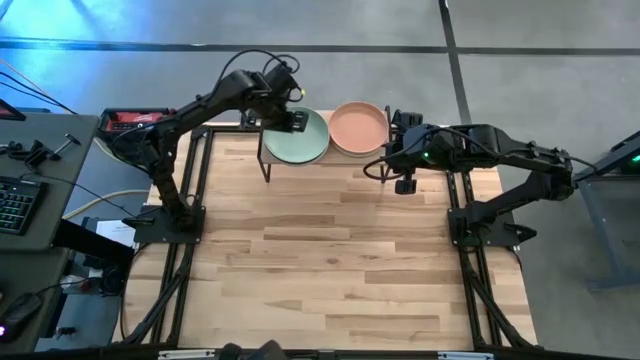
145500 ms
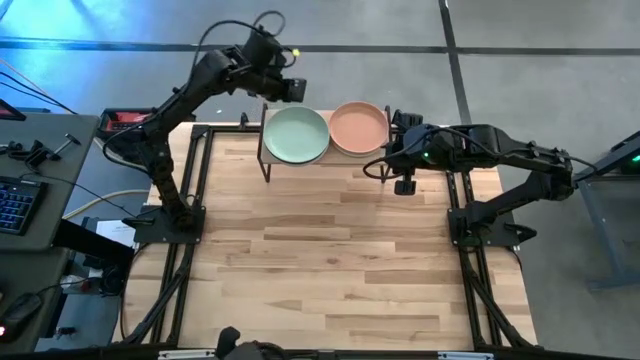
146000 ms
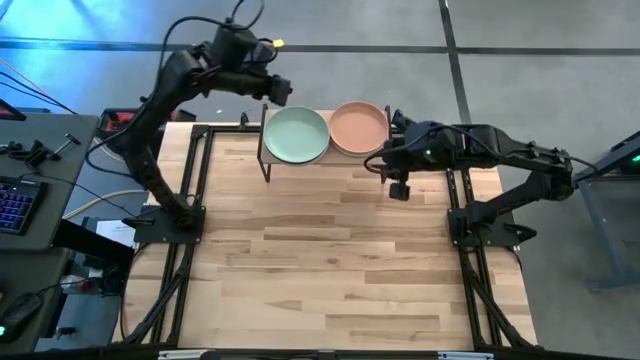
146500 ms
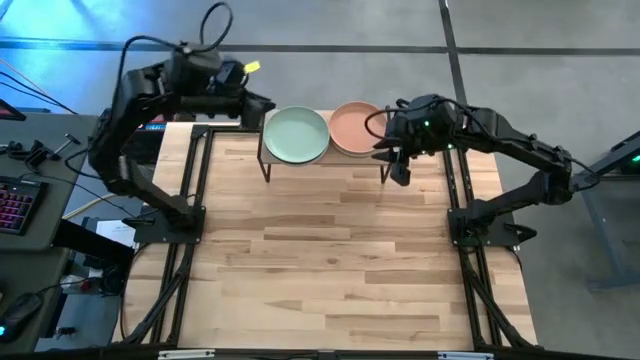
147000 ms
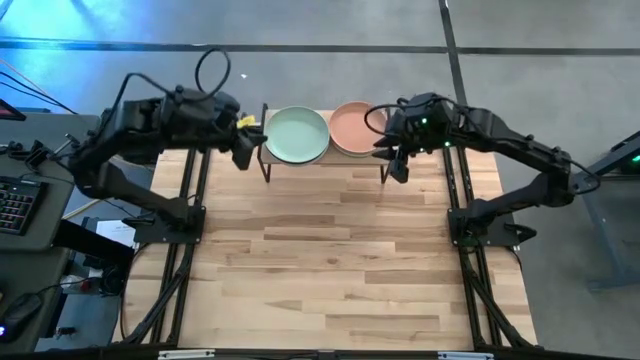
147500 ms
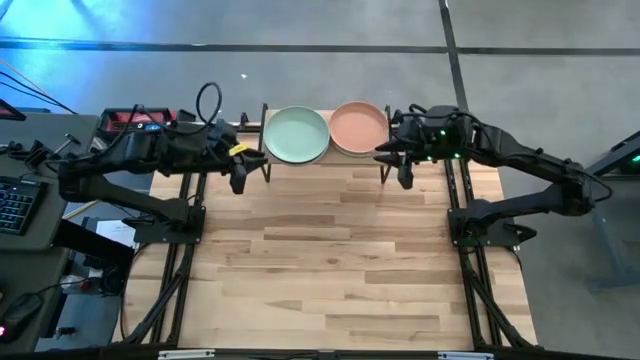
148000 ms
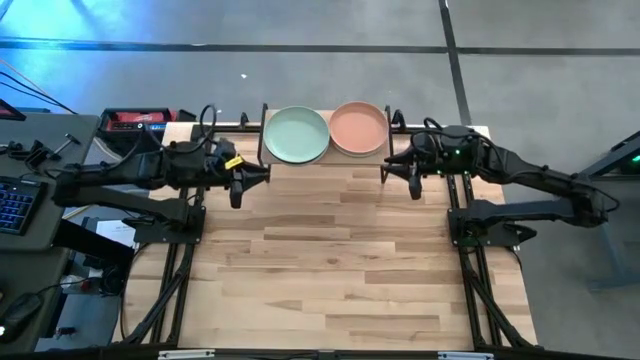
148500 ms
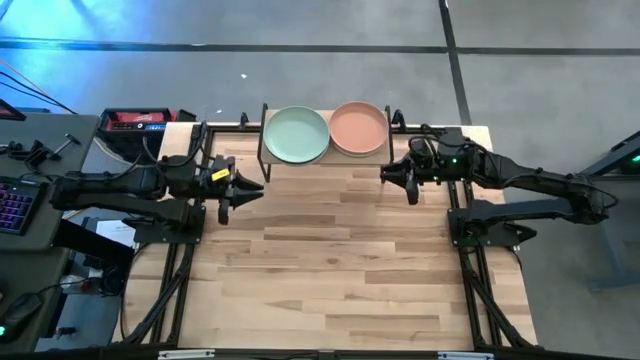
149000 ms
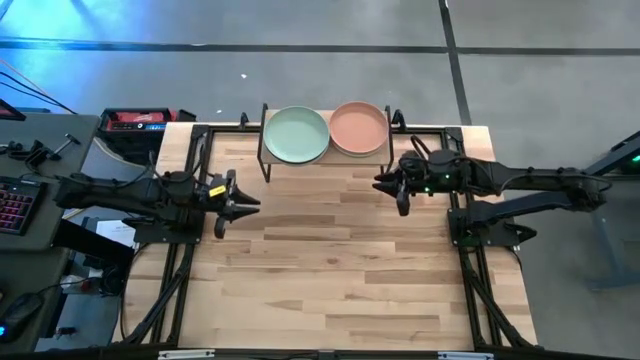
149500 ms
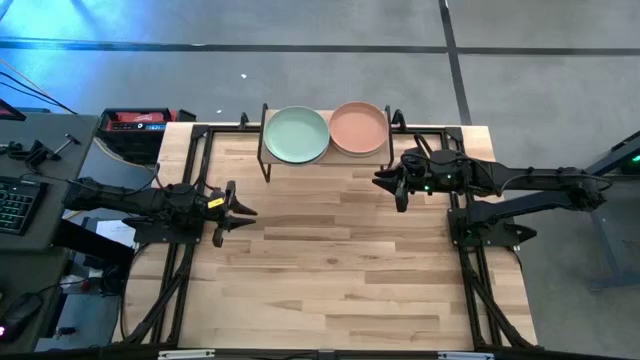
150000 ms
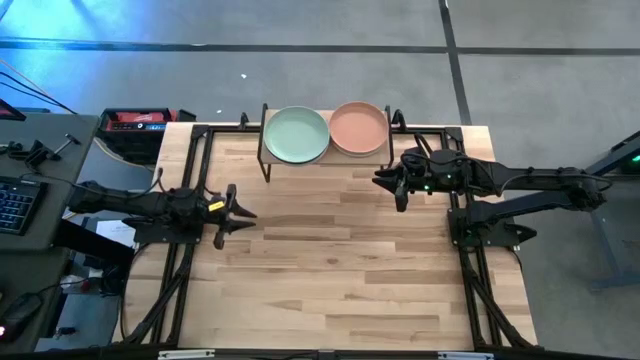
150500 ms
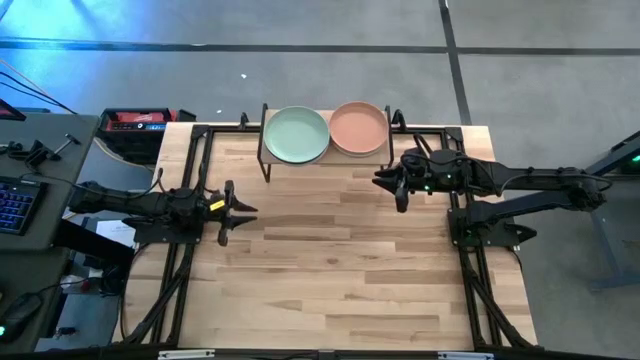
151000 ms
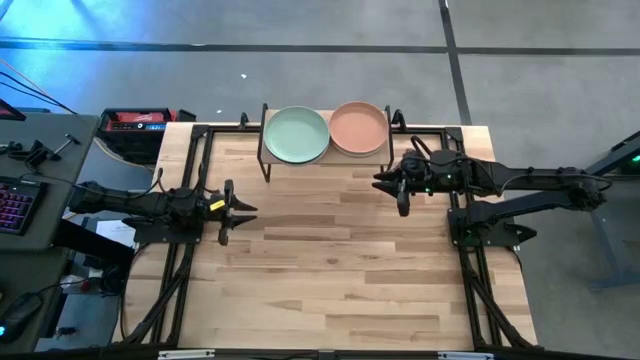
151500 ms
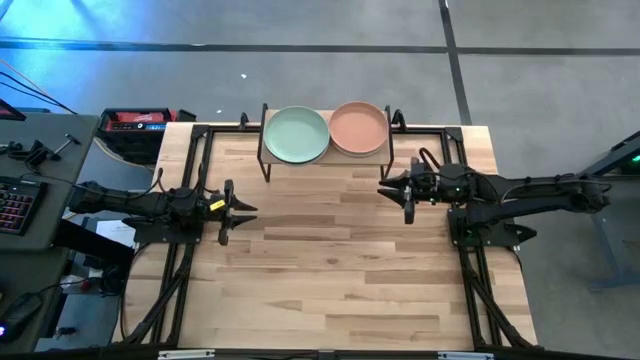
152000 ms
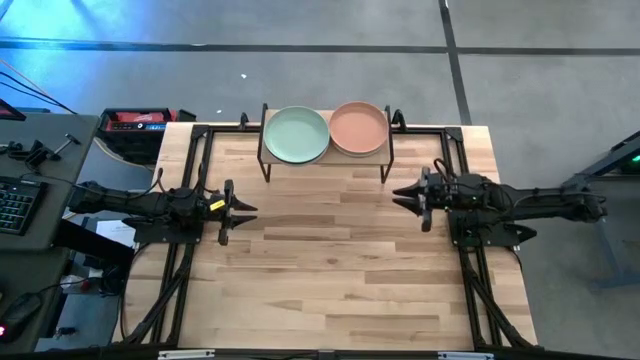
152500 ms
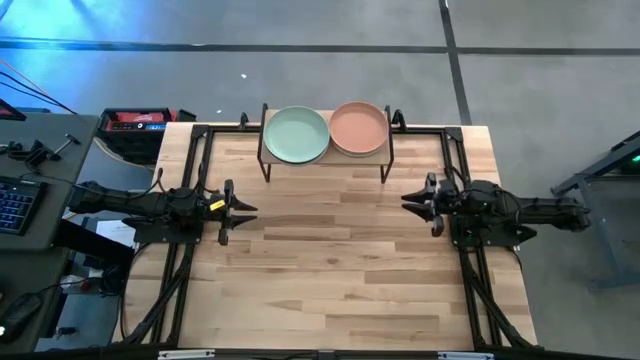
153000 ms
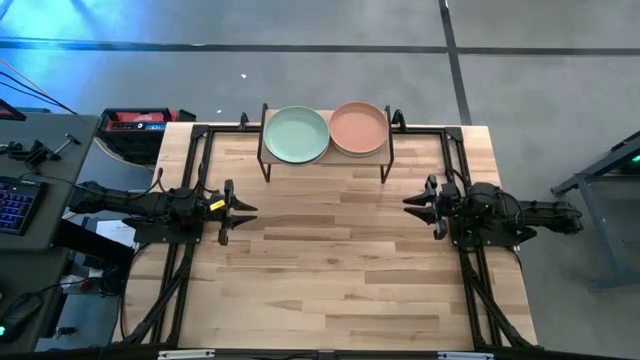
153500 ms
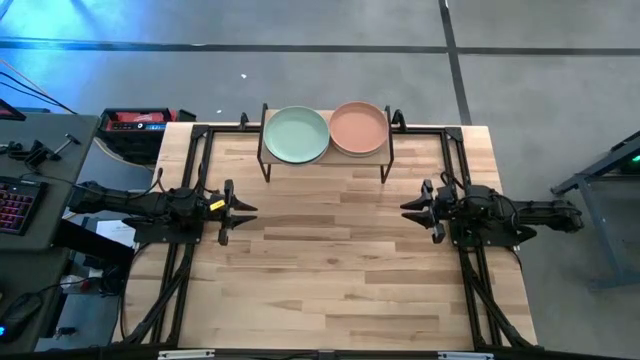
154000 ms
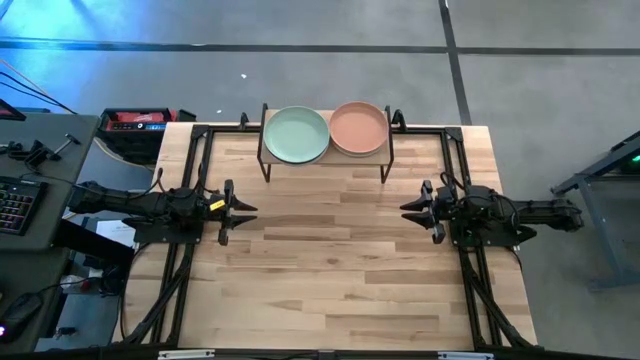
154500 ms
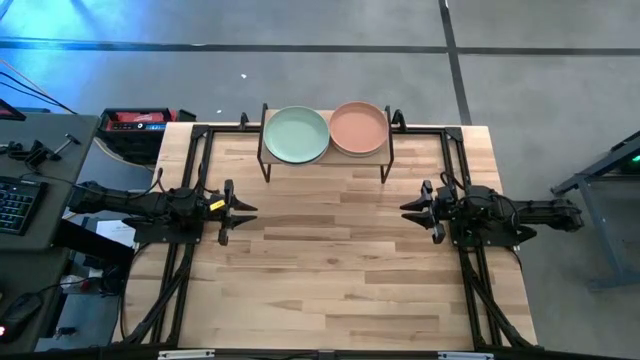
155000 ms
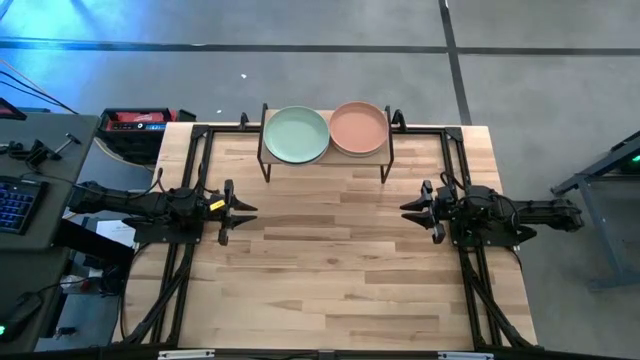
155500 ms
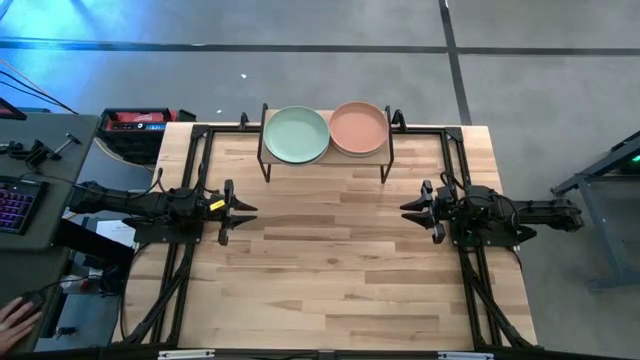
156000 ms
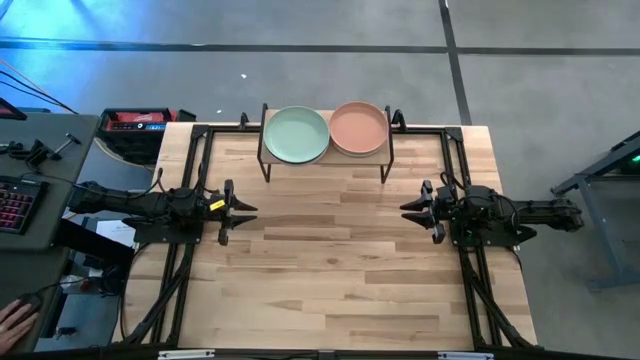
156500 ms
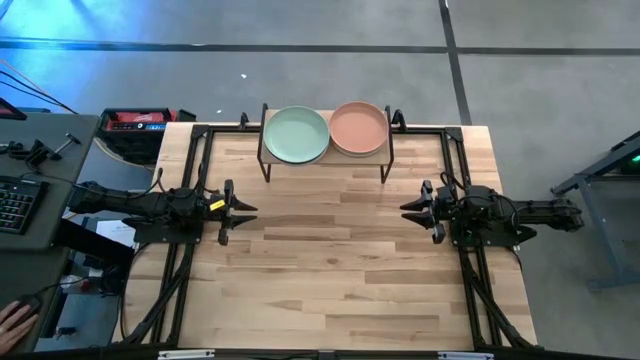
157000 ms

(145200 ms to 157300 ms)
Task: Place and stack plates onto a shelf
Return to Home Position

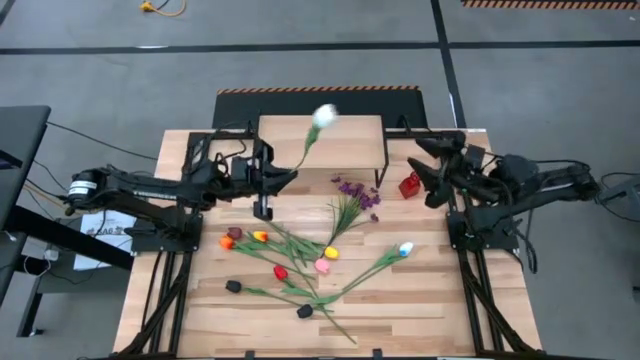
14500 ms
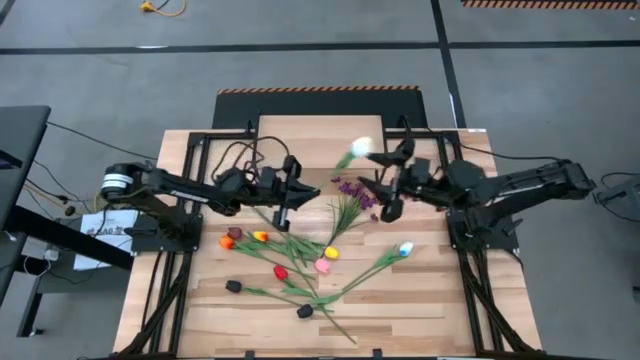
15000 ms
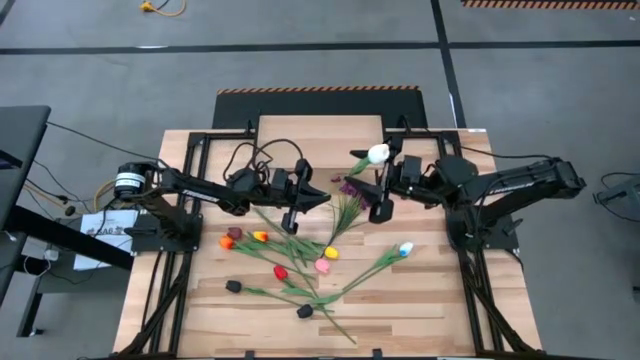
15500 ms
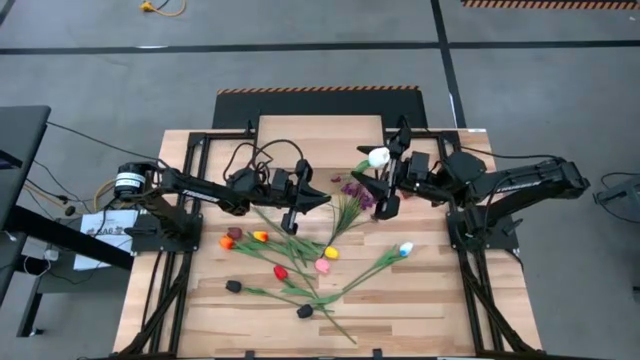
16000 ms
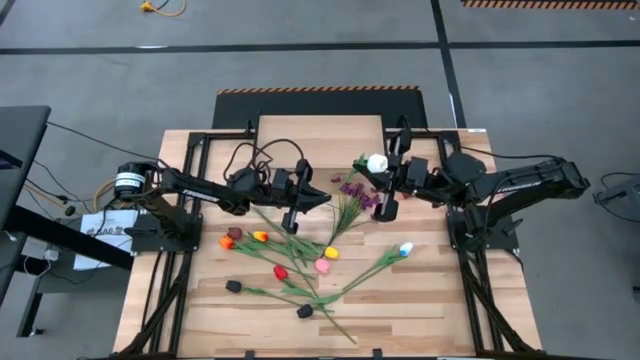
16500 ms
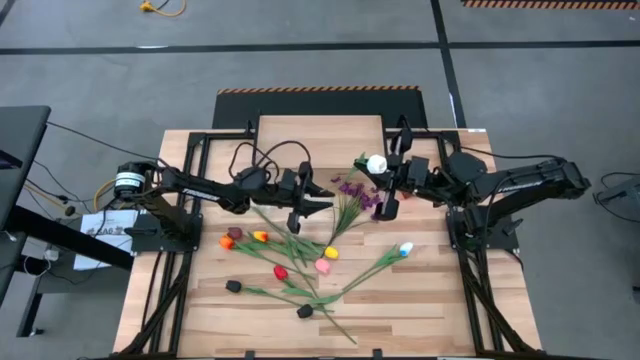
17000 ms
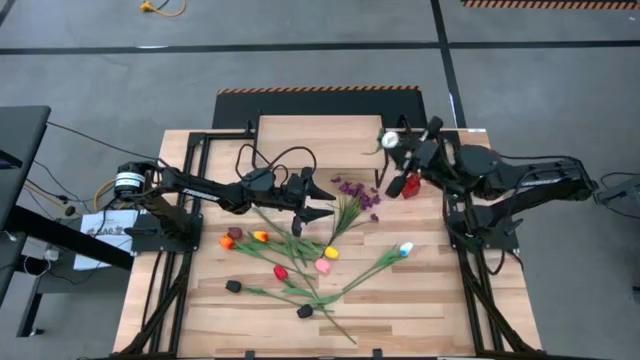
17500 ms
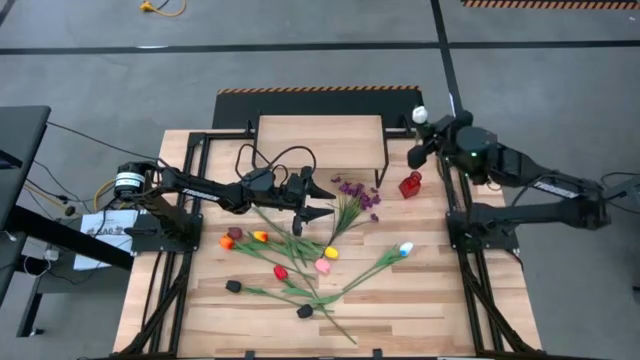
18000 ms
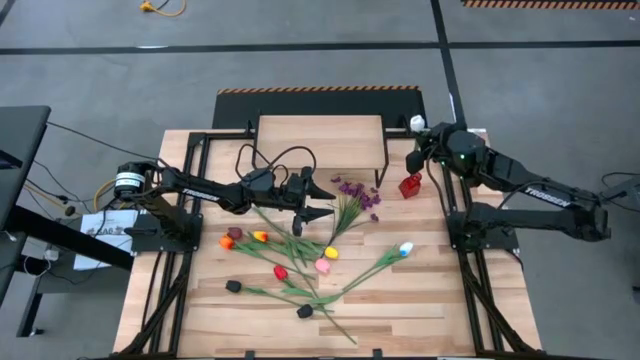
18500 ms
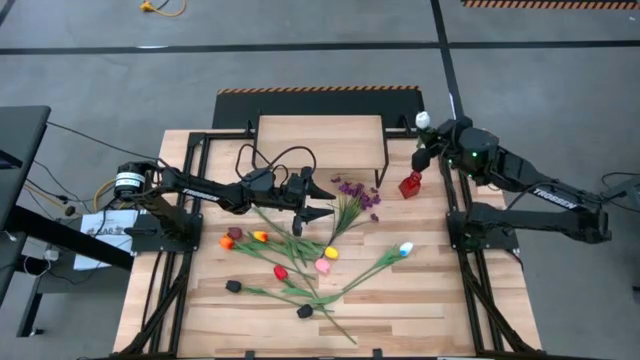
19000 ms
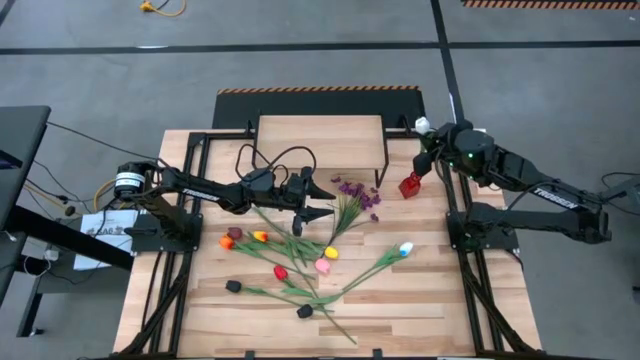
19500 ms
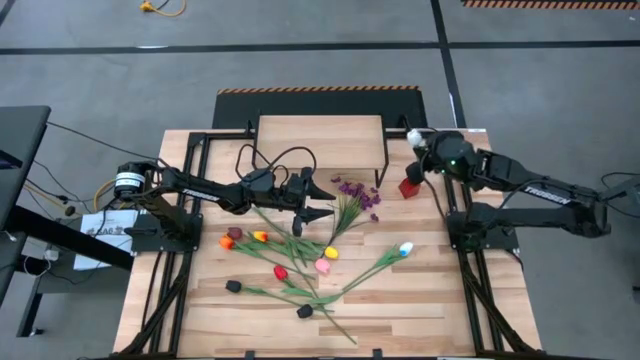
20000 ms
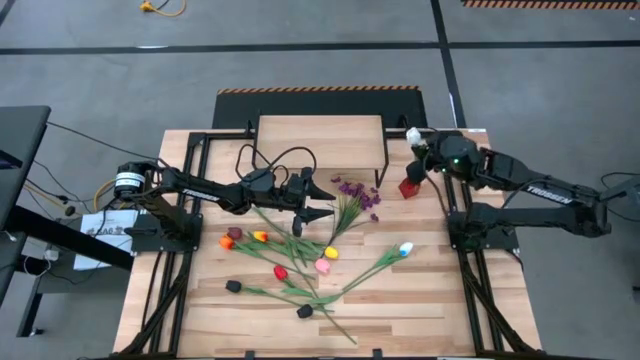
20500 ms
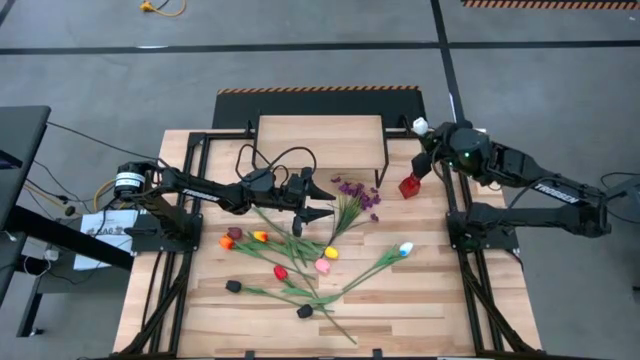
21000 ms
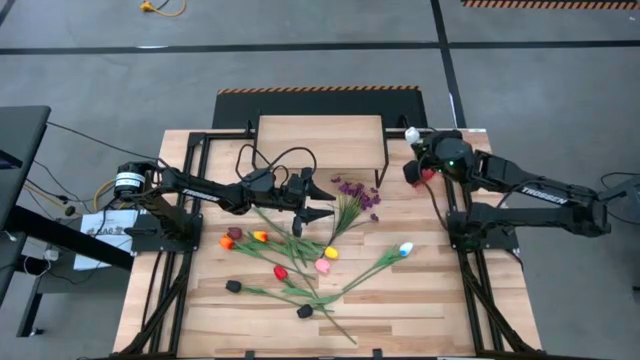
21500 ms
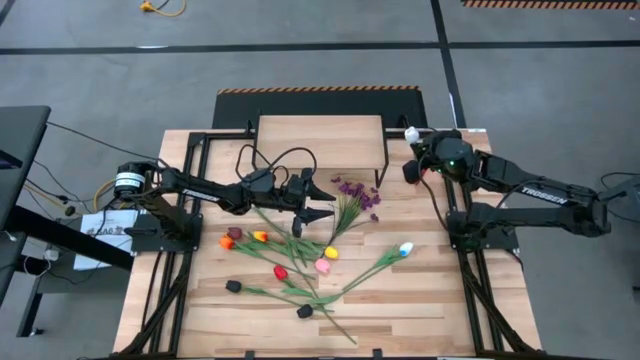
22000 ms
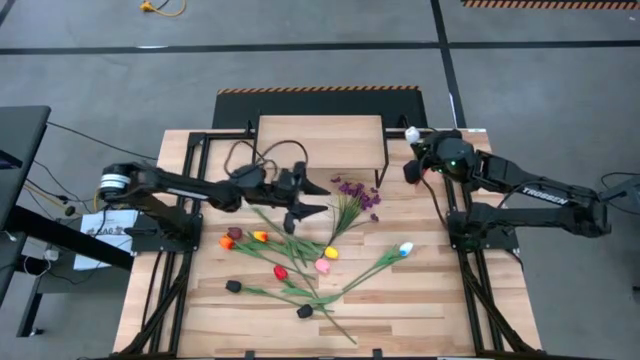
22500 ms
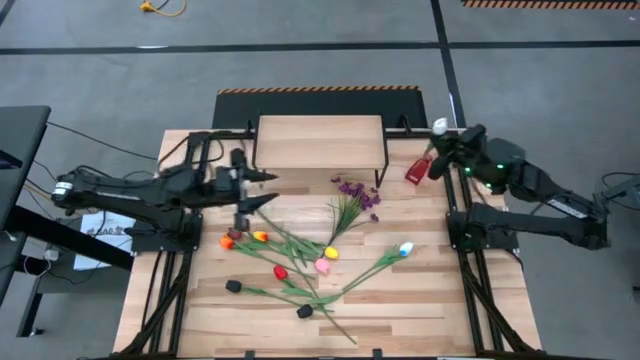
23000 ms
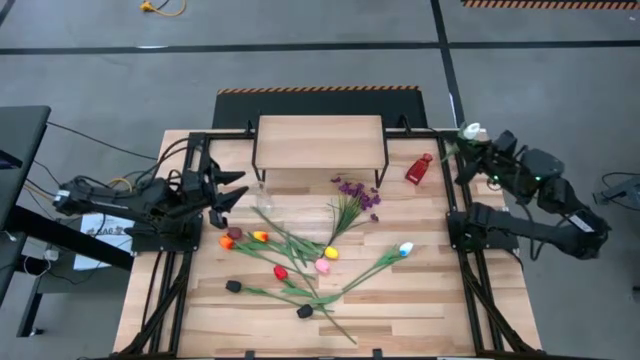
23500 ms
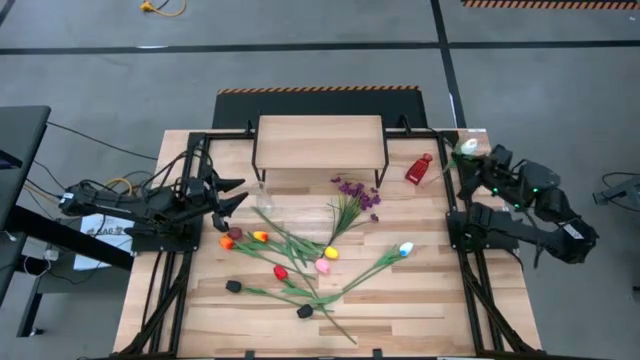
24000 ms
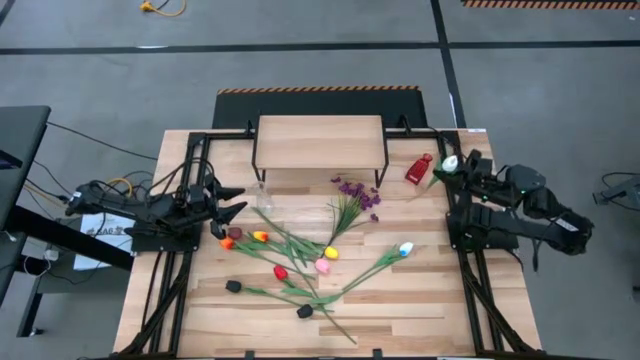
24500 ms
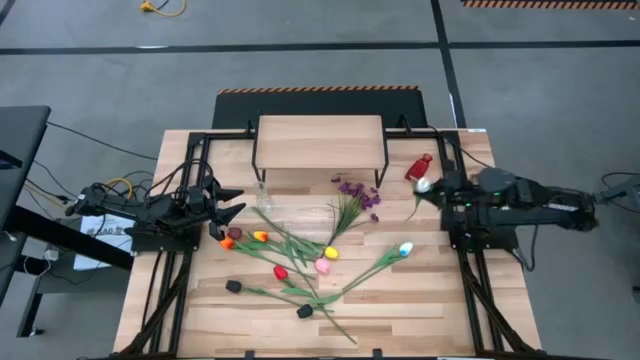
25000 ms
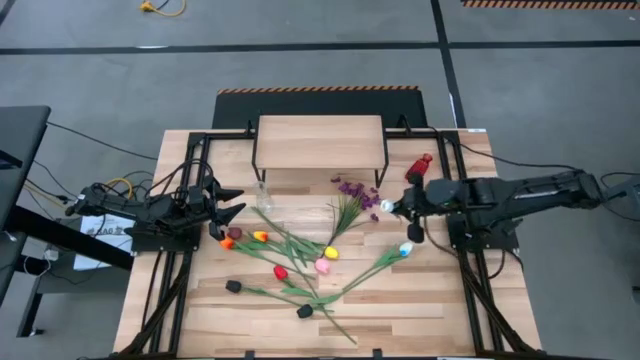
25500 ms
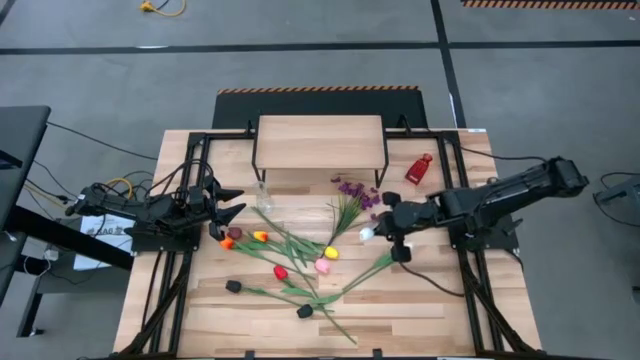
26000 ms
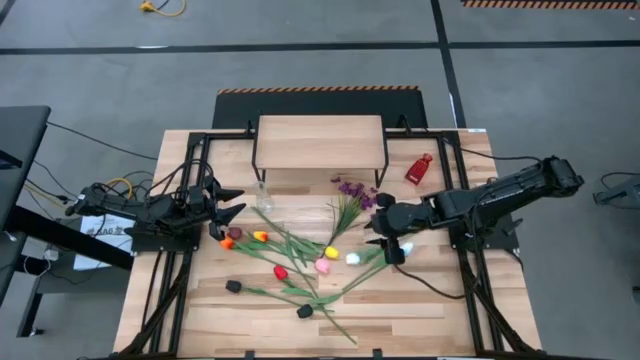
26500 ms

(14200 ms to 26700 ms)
Task: Pick and place flowers into a vace then onto a shelf
Put the top white flower into the red vase
